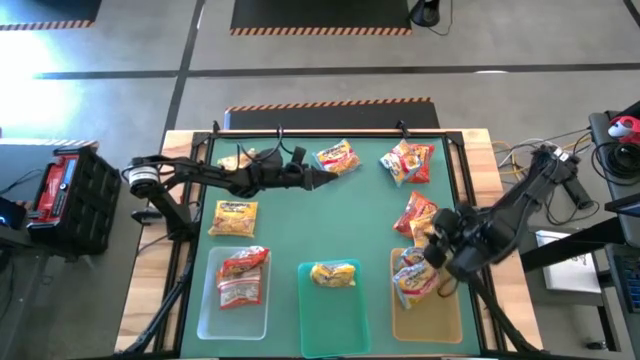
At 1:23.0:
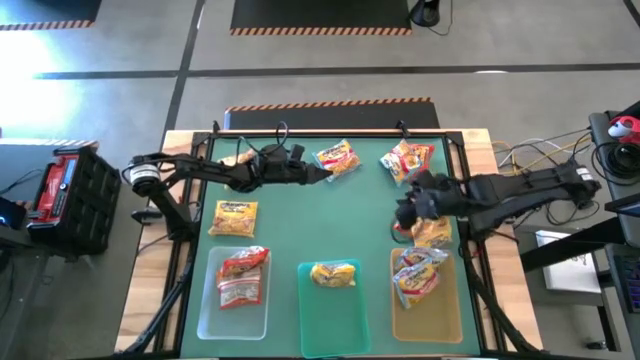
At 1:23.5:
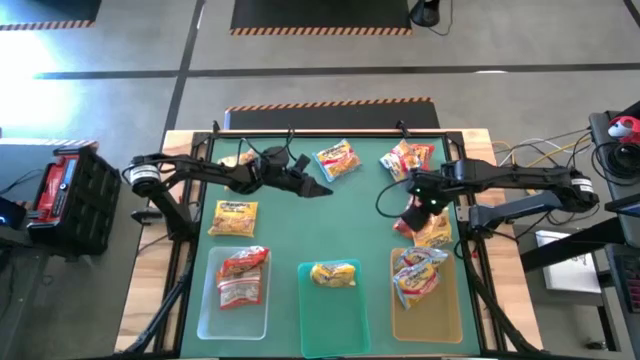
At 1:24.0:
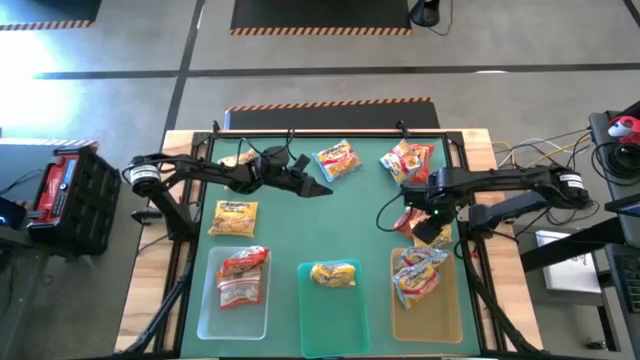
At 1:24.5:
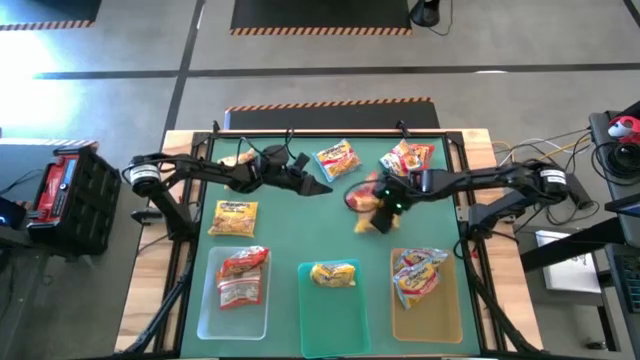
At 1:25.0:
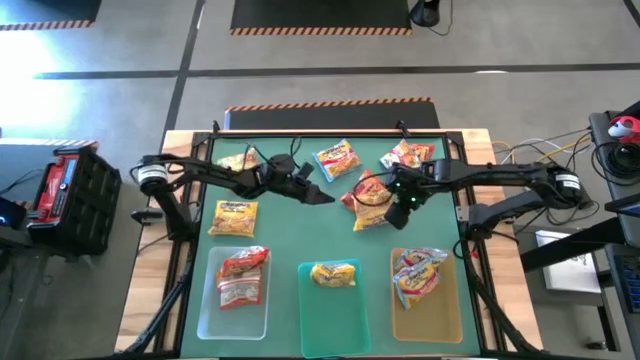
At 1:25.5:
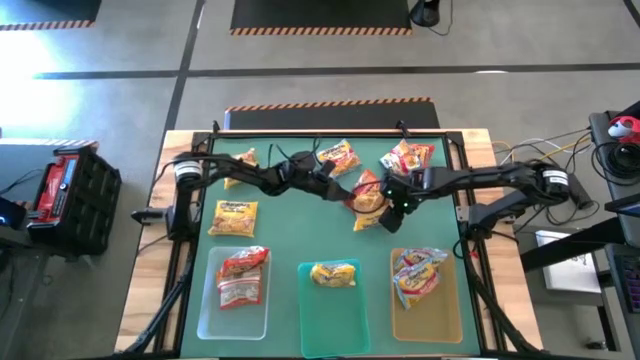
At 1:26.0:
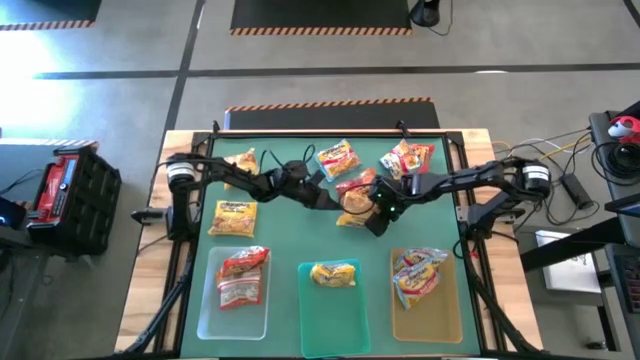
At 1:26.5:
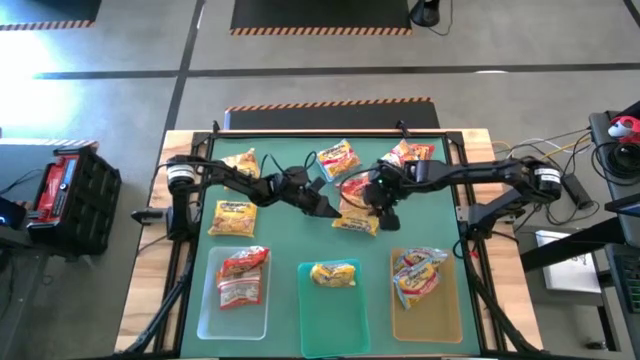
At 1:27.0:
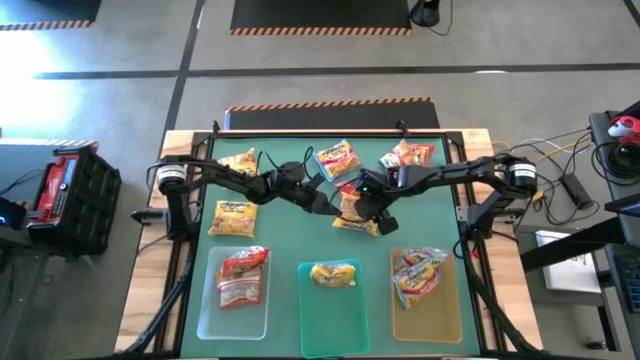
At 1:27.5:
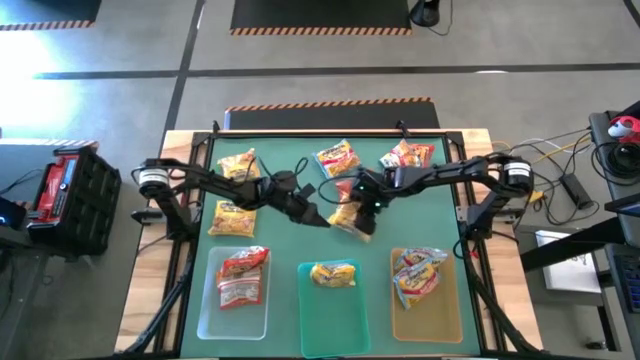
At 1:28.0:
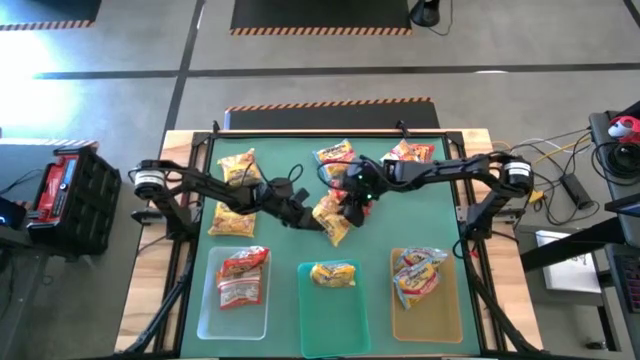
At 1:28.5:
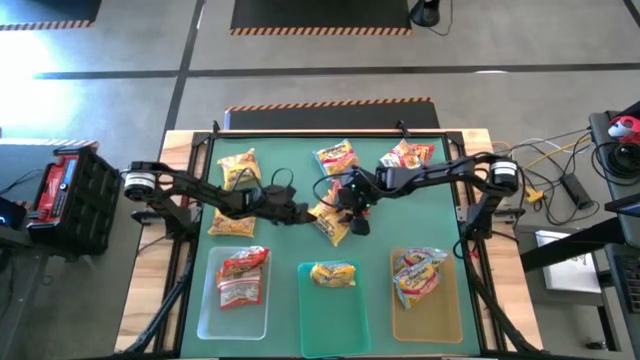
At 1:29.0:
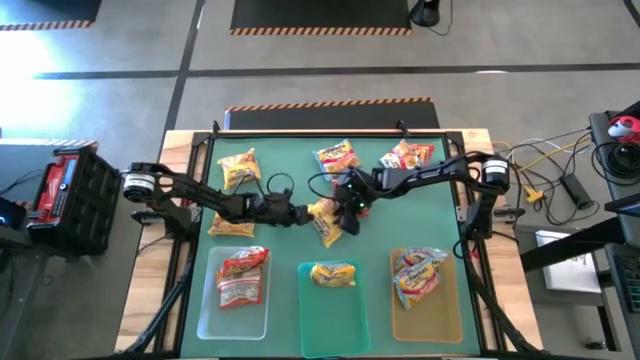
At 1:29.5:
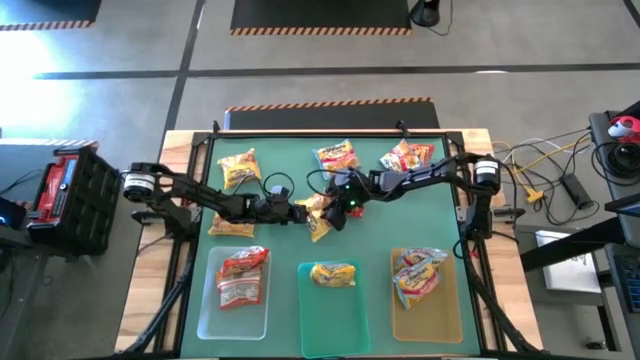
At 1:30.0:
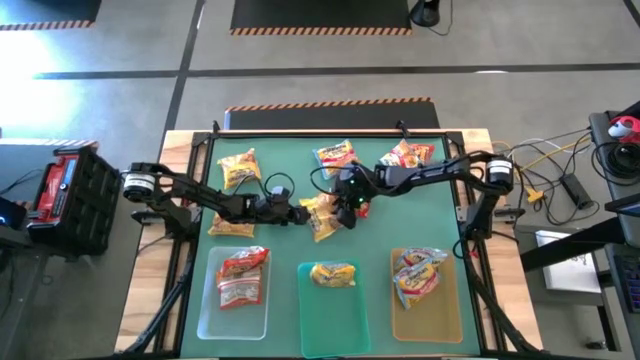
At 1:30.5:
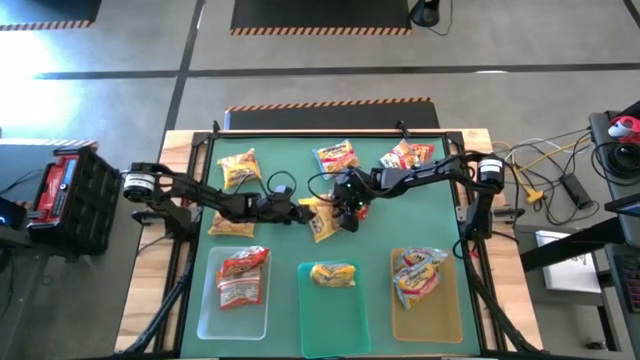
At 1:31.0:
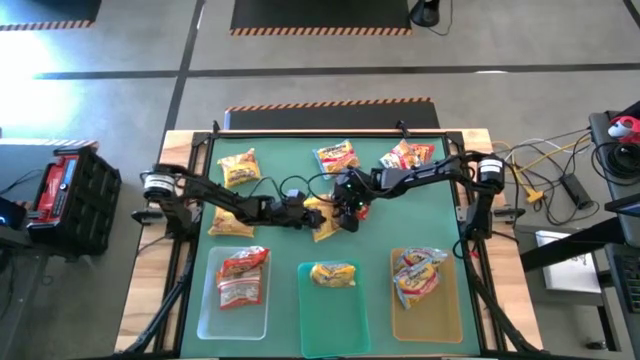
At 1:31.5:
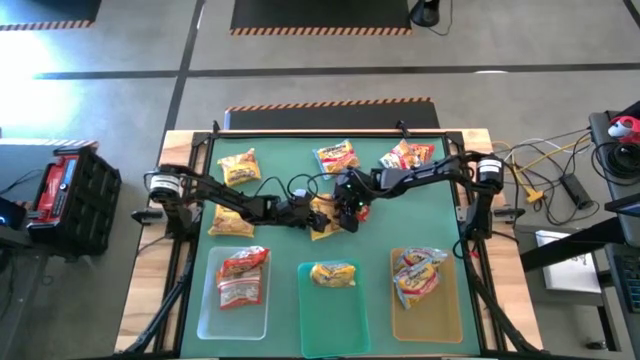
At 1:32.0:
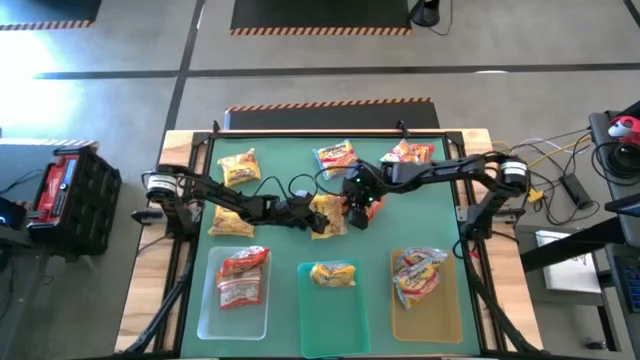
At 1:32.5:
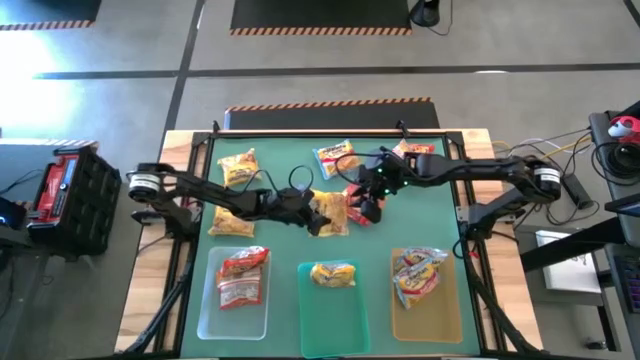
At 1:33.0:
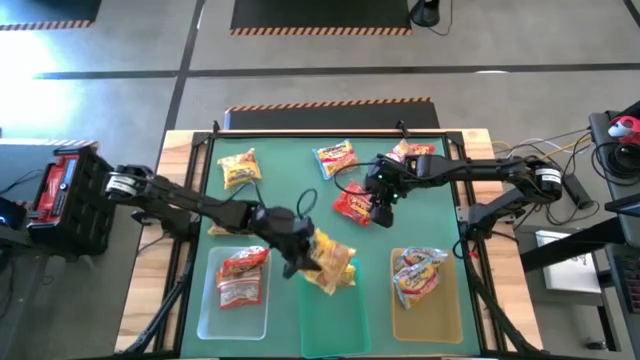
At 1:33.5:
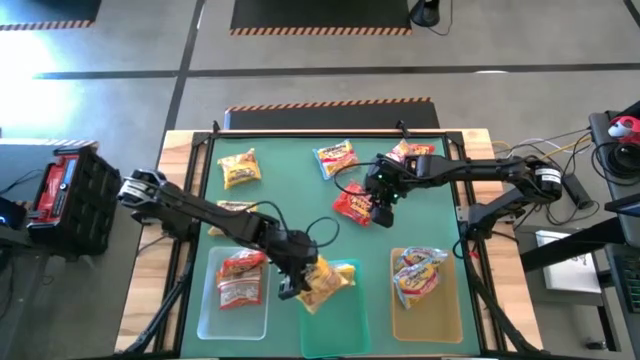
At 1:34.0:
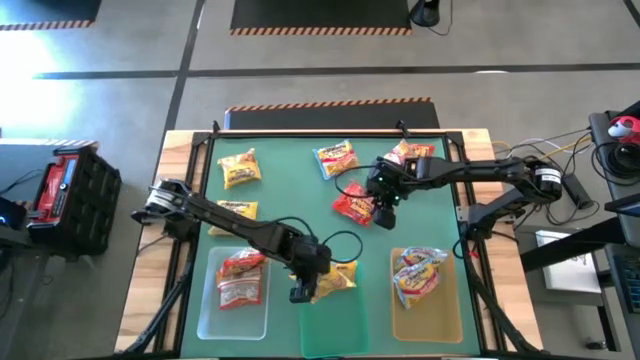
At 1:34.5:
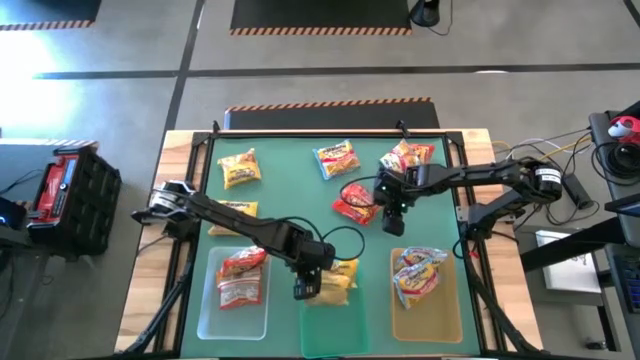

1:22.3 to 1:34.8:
Task: Sort Maruchan noodles
Put the yellow noodle pack into green bin

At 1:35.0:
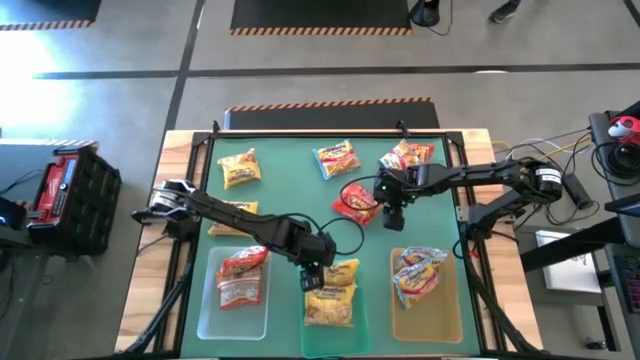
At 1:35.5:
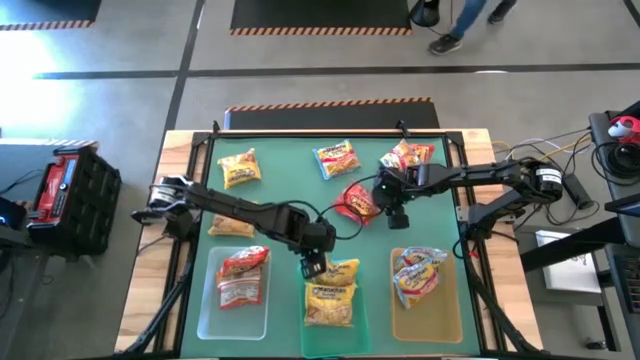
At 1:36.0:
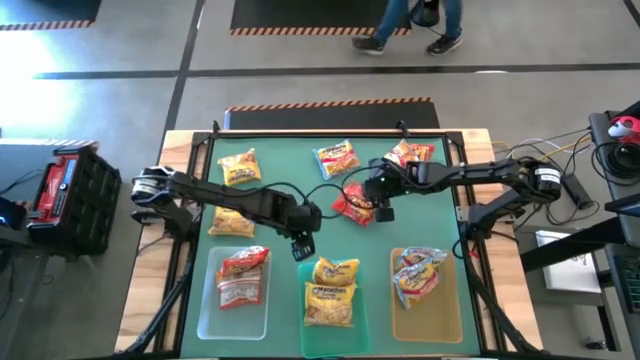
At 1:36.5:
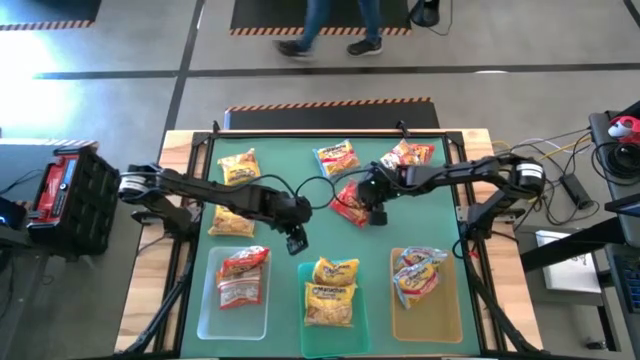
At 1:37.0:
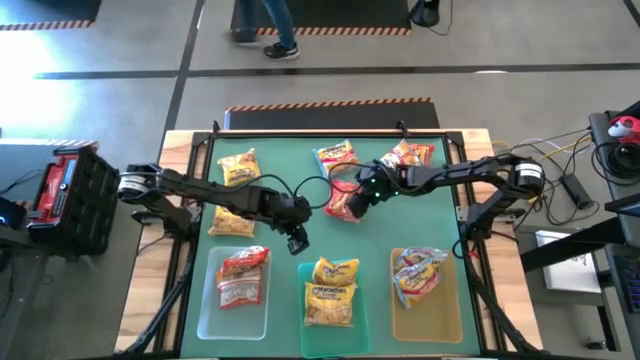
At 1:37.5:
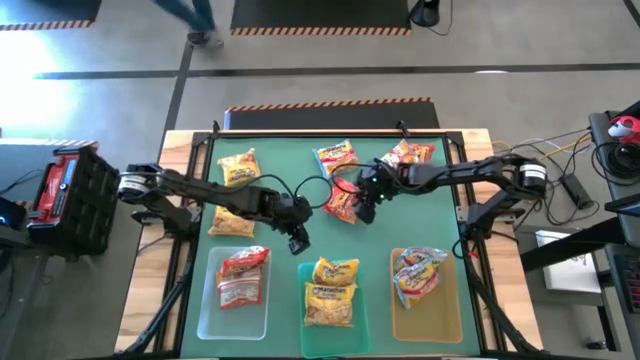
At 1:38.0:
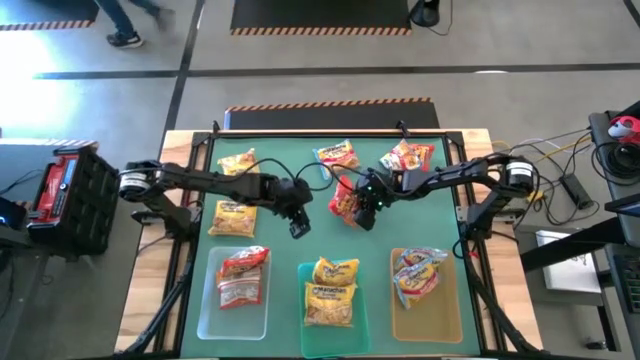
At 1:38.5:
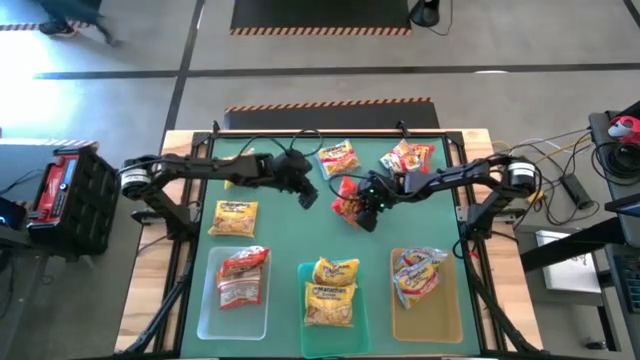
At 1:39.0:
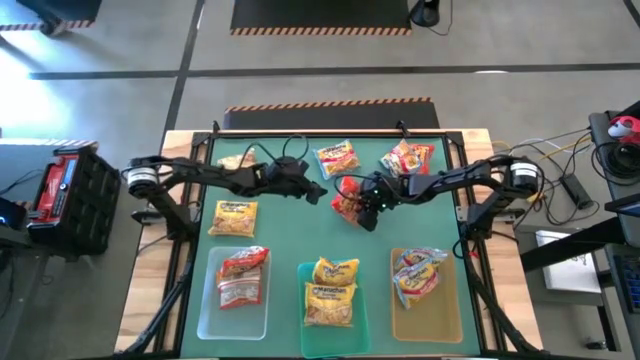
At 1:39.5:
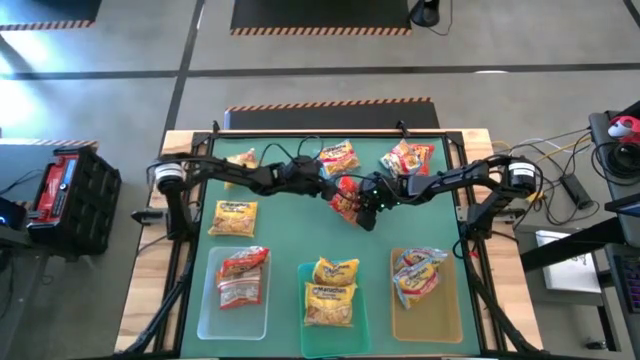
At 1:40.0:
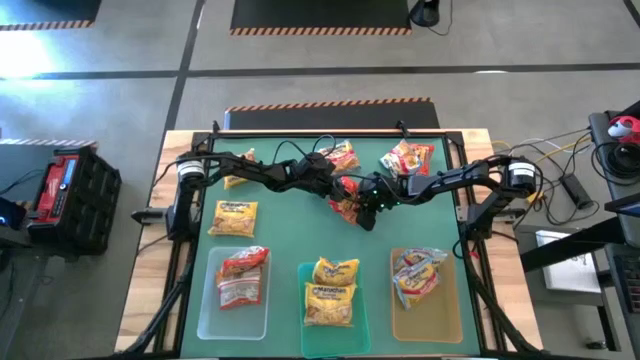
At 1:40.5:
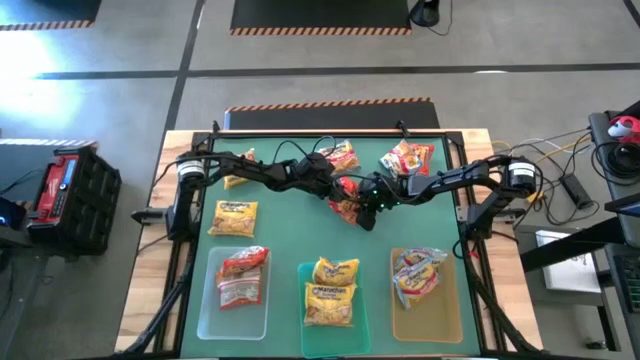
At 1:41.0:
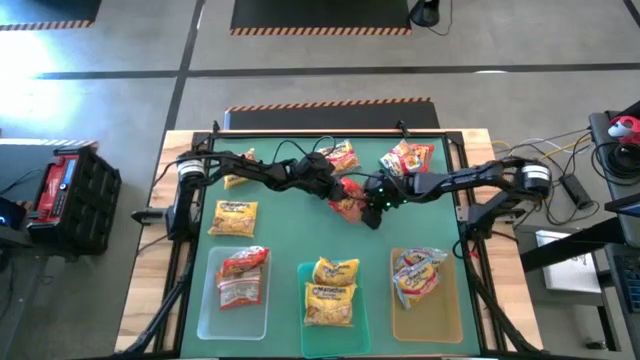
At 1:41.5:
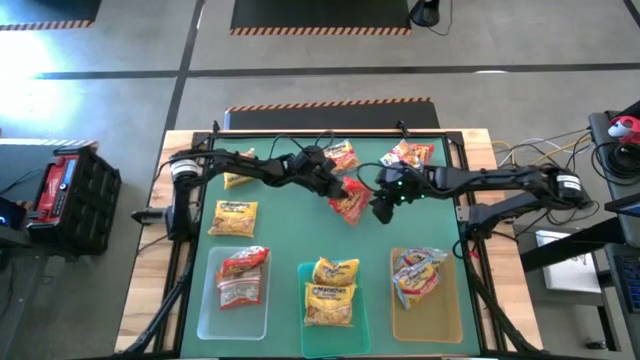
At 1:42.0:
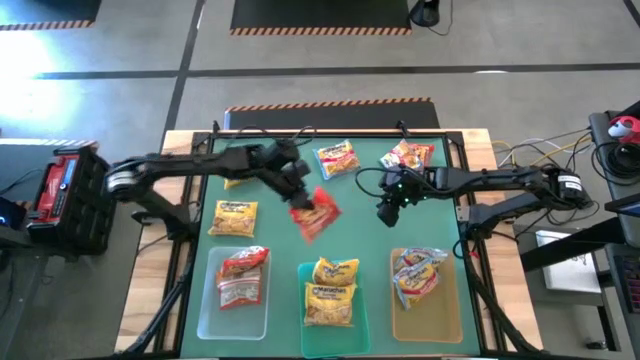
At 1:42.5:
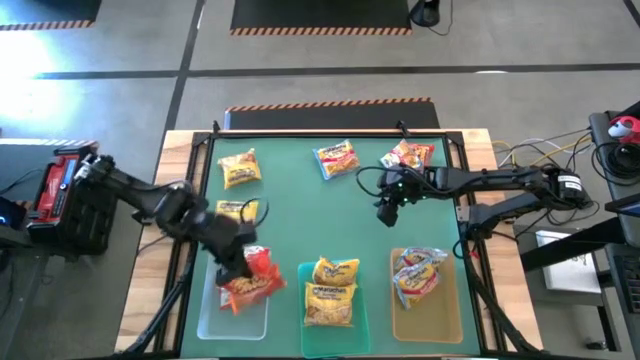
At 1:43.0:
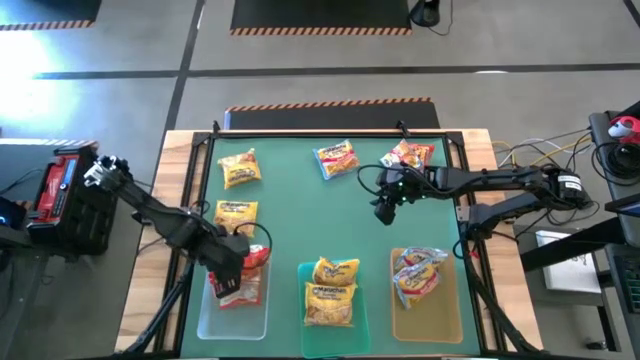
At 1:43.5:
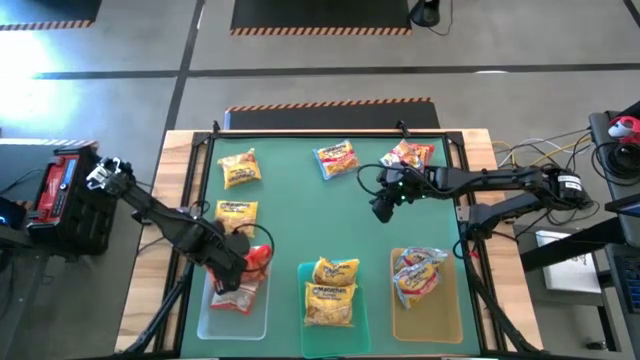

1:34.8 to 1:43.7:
Put the orange noodle pack into the white bin
